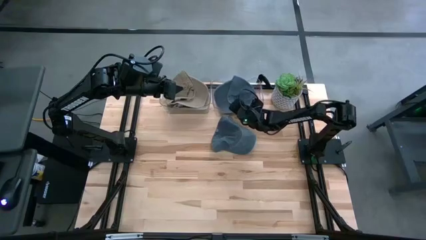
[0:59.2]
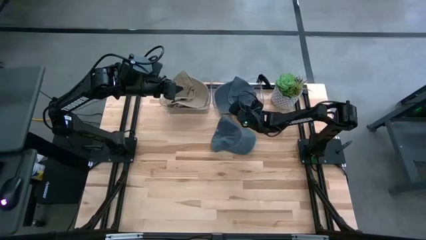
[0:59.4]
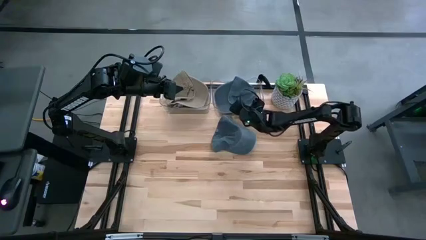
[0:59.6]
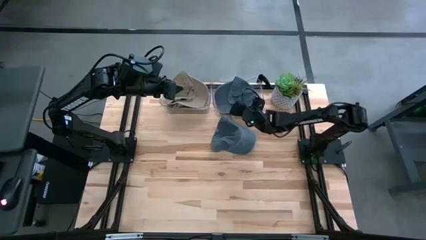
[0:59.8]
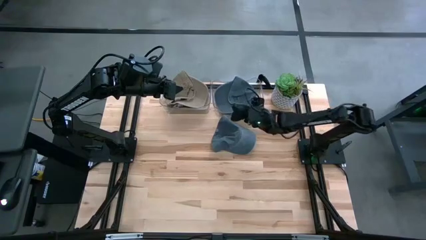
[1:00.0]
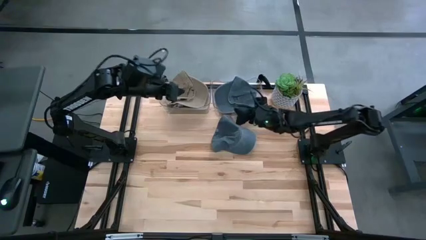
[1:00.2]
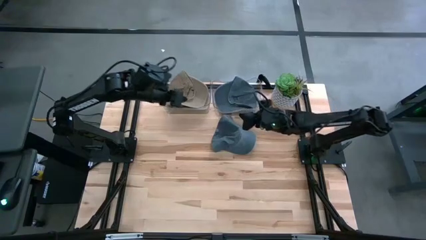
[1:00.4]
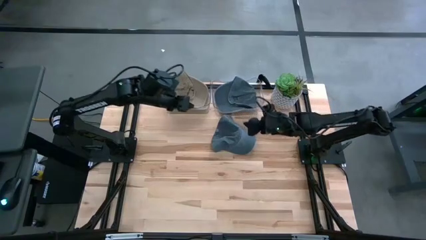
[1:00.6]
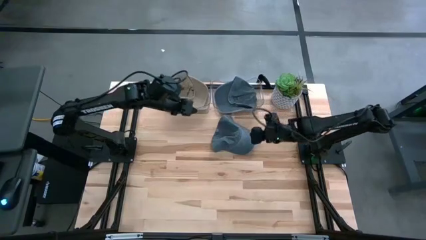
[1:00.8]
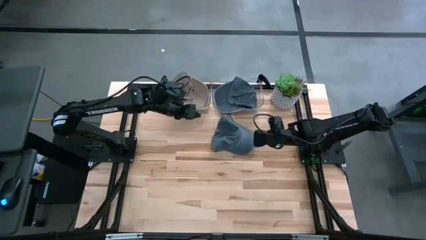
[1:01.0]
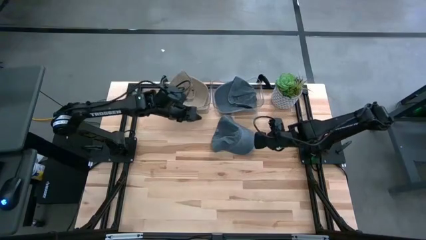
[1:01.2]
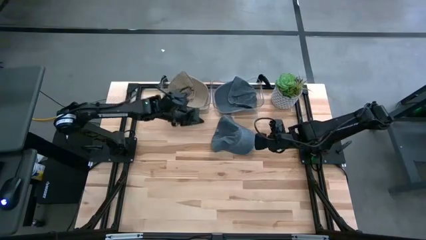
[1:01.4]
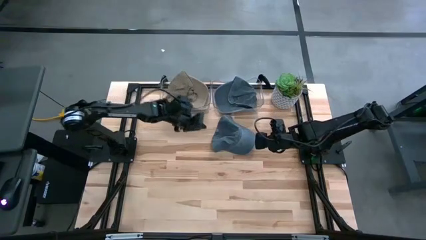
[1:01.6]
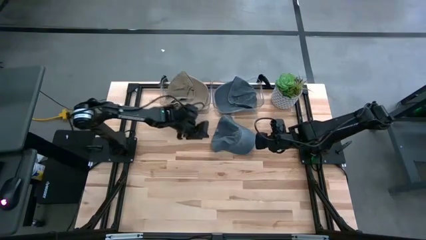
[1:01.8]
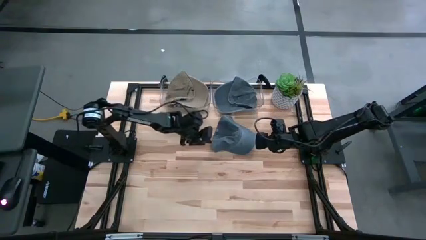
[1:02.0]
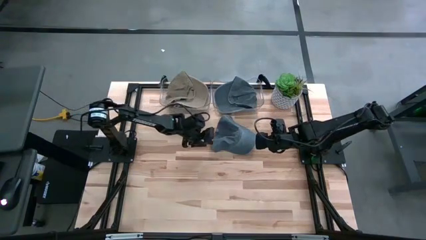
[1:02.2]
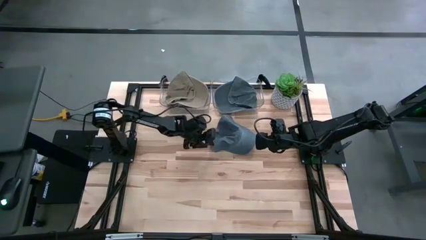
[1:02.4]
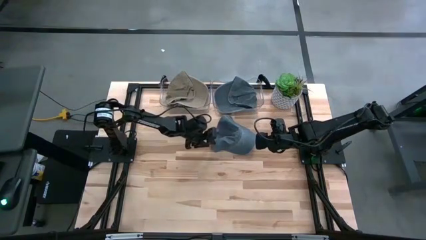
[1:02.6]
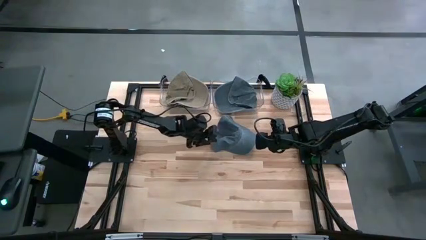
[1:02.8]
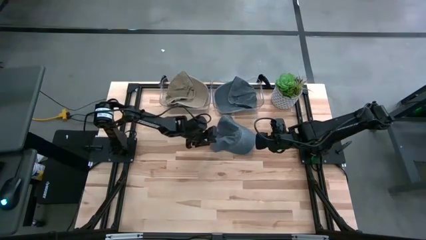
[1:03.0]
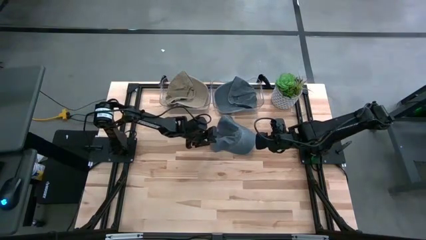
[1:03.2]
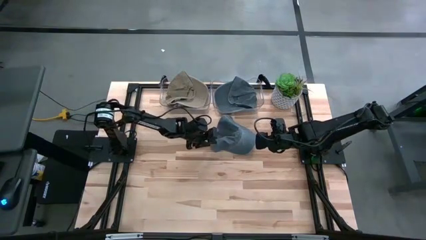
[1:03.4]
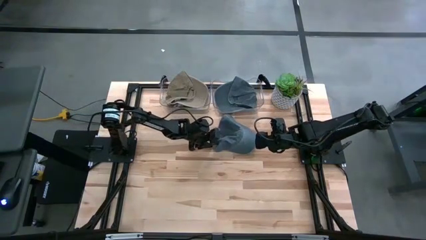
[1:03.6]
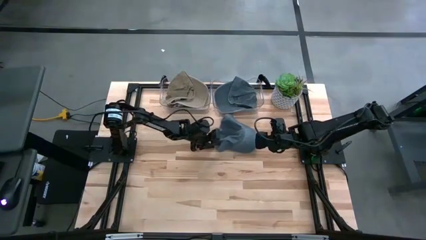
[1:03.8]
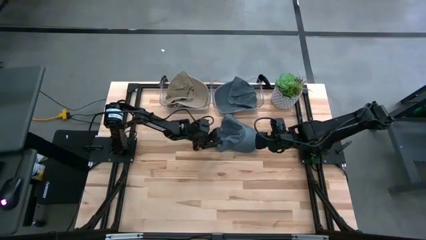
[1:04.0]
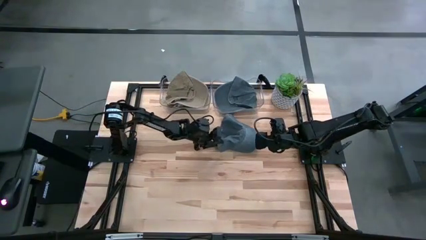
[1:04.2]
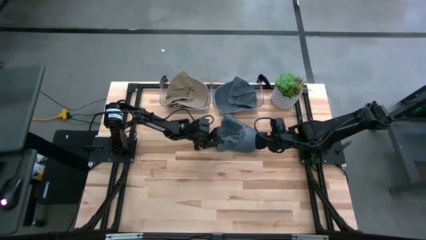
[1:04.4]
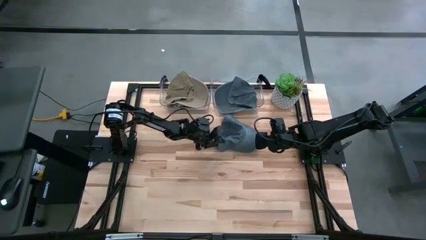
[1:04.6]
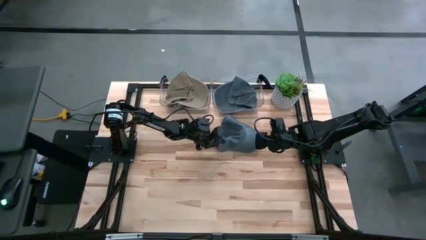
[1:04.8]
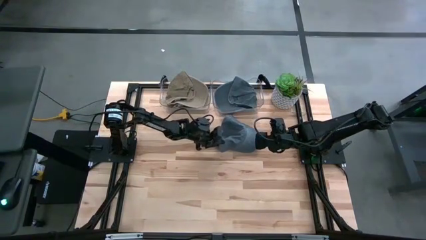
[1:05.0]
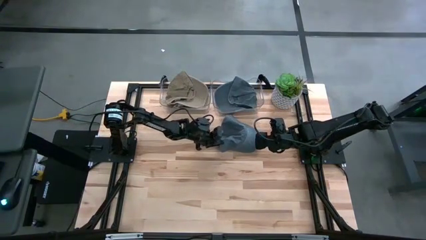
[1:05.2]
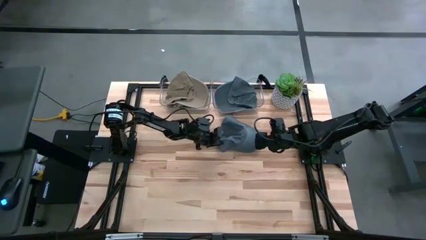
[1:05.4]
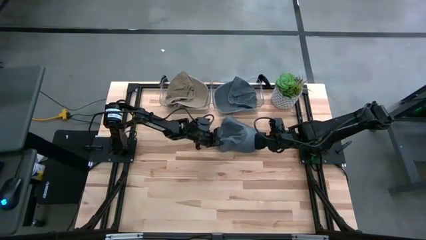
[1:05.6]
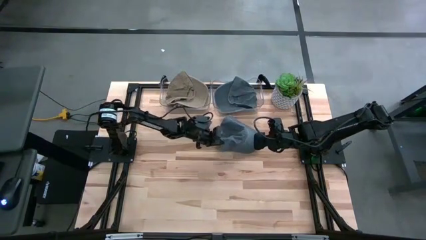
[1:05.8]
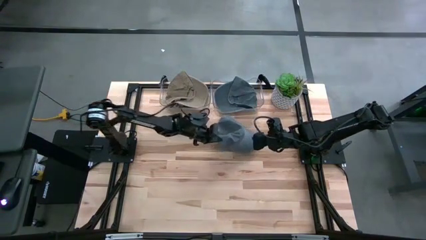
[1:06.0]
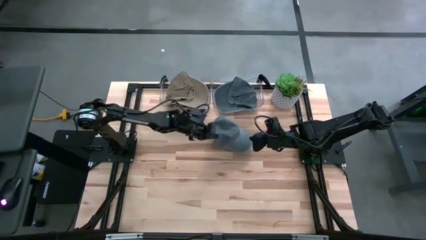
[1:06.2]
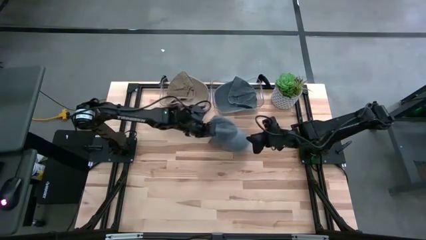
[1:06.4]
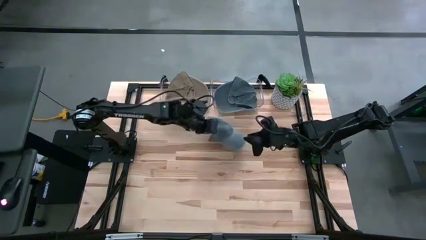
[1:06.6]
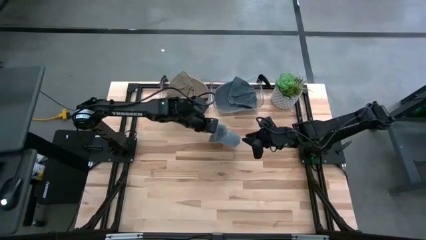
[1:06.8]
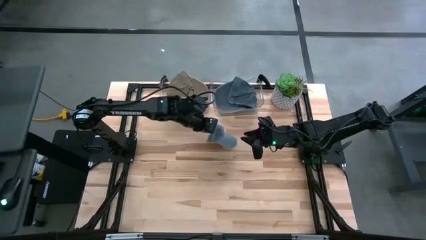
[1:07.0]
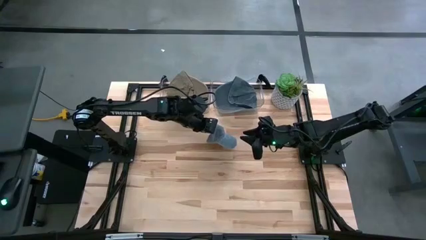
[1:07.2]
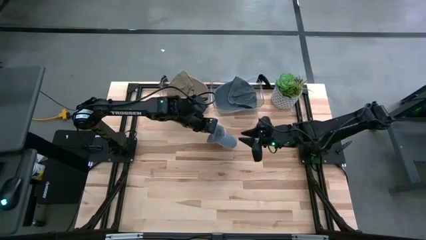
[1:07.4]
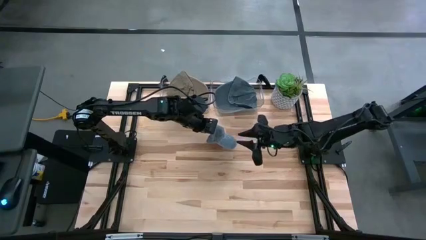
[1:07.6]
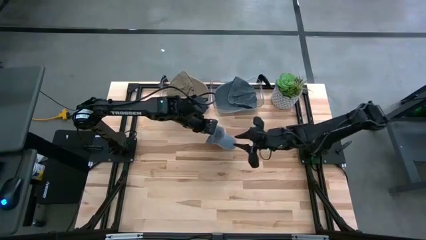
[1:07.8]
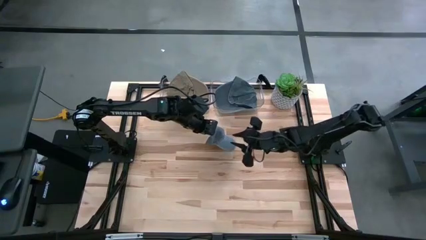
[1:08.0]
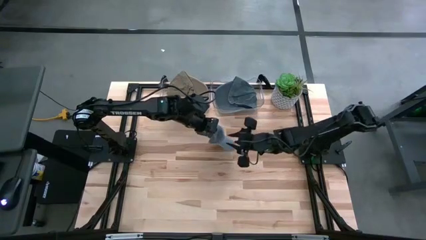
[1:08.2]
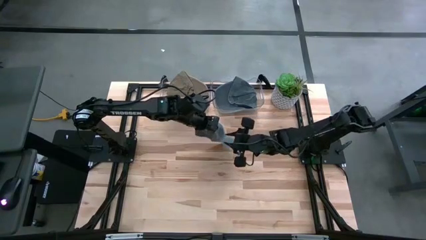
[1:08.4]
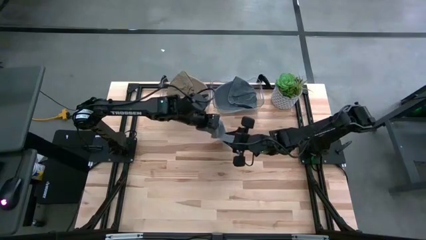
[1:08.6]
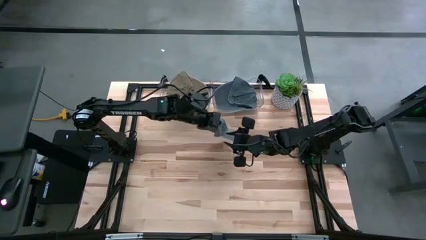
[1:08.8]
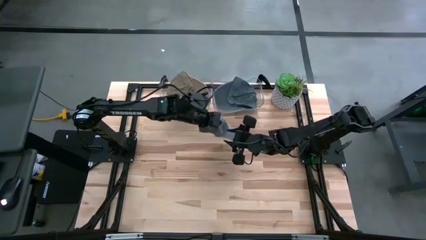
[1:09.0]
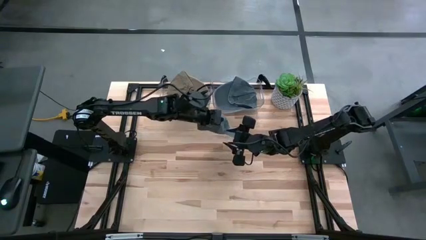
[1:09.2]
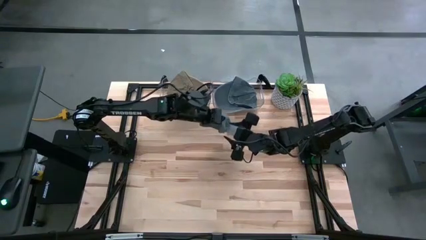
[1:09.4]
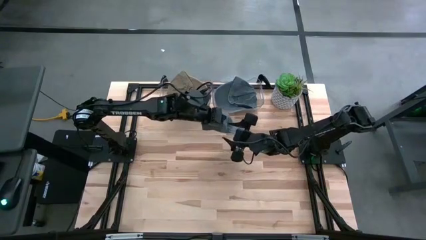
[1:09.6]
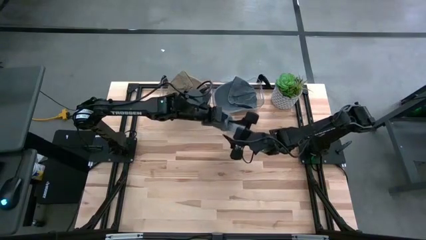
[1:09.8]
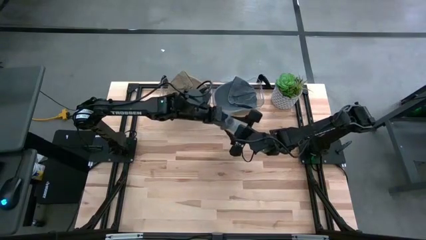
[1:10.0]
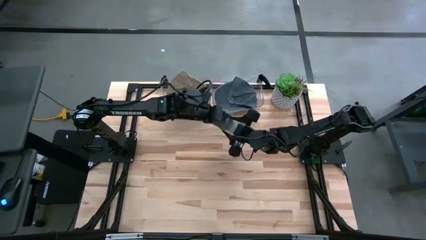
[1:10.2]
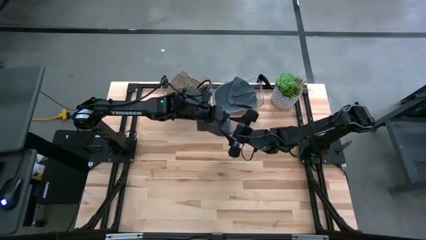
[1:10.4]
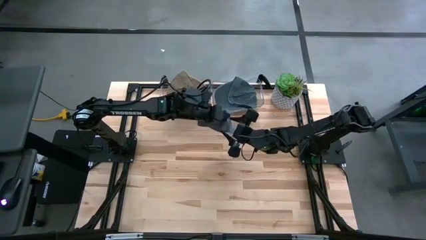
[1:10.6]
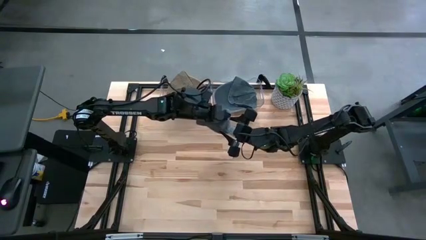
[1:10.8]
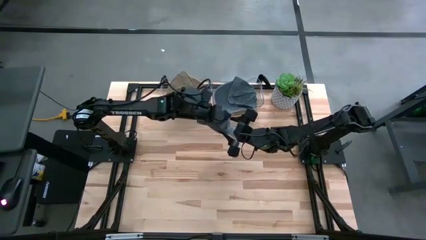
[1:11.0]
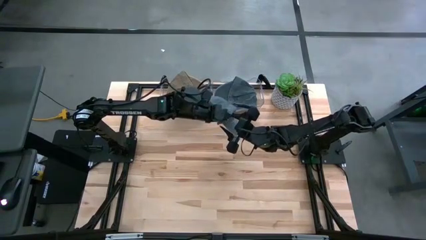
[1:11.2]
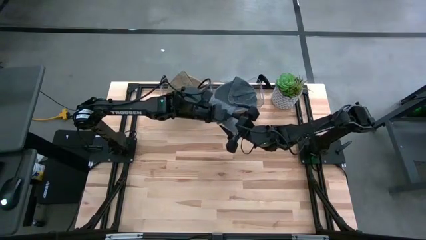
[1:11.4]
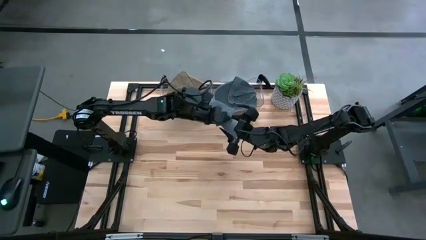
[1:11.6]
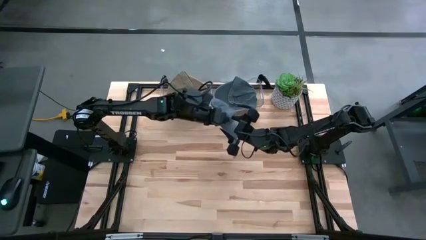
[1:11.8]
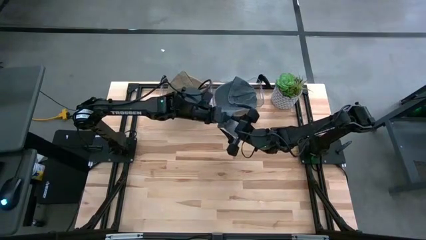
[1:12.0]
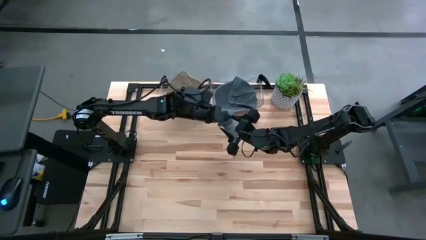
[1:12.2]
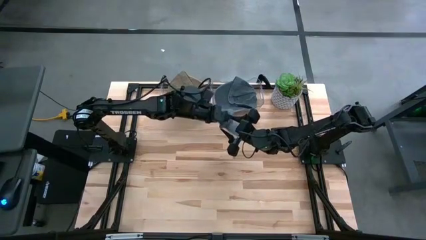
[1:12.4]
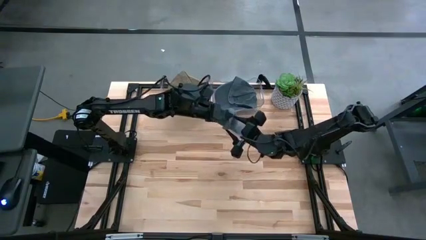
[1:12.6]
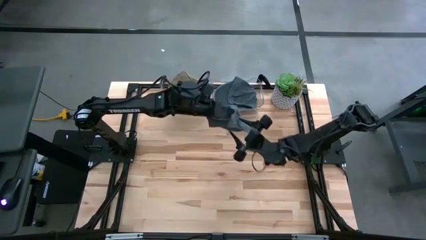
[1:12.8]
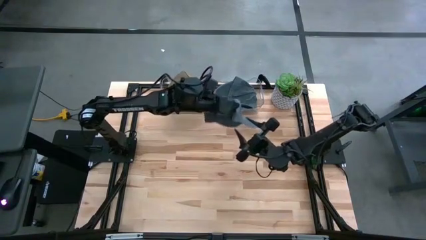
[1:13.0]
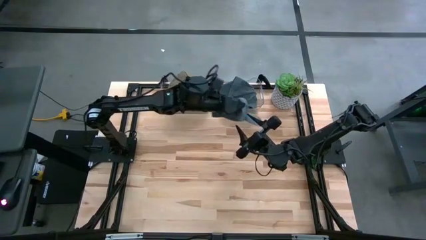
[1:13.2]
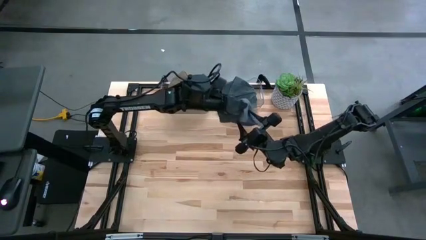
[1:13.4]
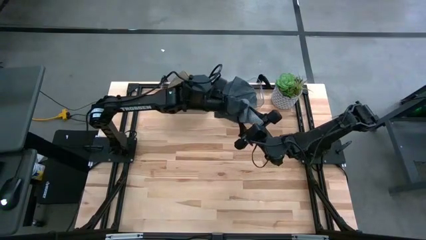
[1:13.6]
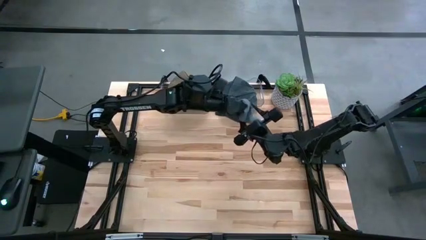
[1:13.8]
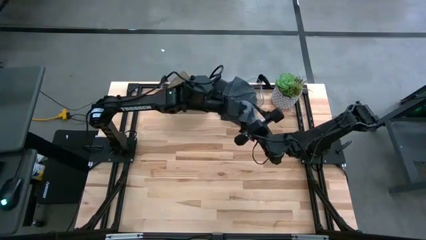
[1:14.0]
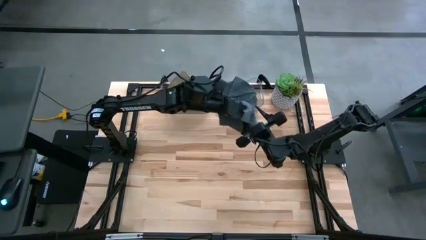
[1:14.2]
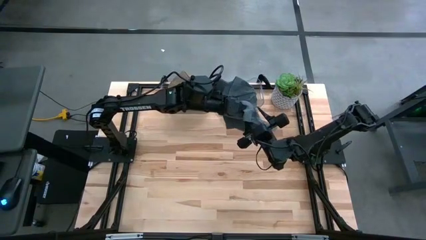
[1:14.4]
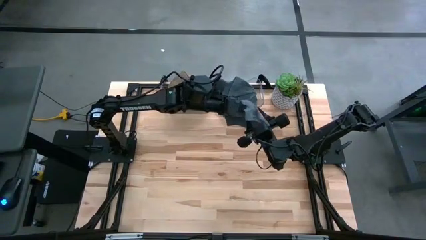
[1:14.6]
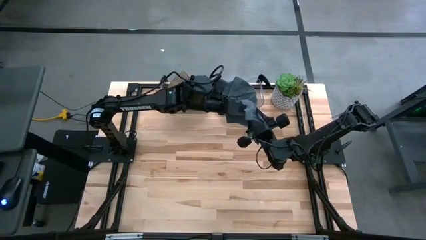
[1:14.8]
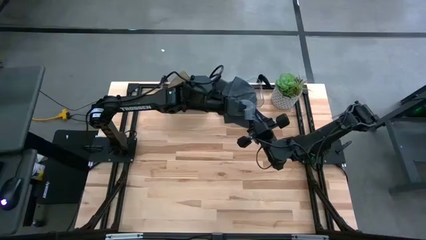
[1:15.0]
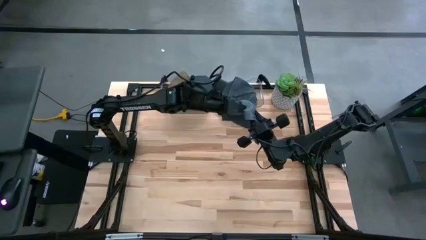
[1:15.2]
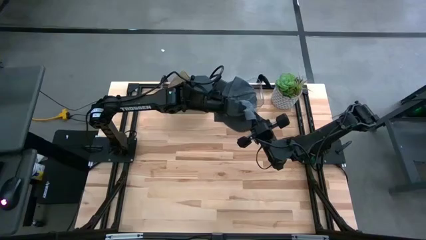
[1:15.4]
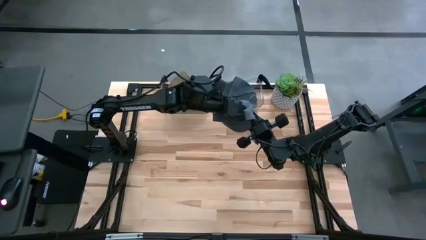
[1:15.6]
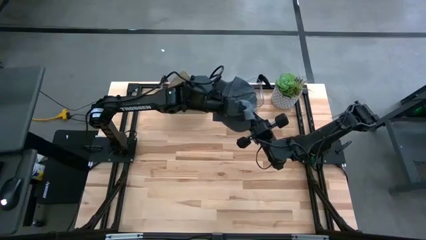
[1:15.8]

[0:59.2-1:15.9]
Task: Pick & Place hat
Put the blue cap into the right transparent bin
